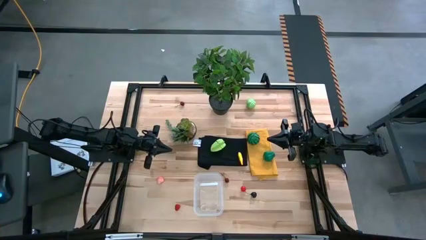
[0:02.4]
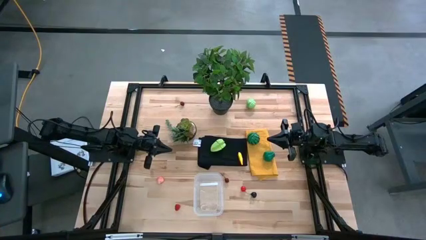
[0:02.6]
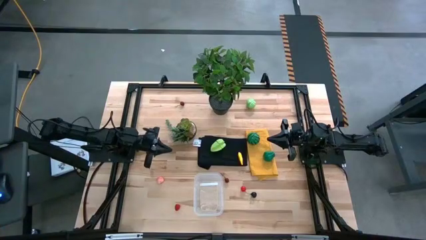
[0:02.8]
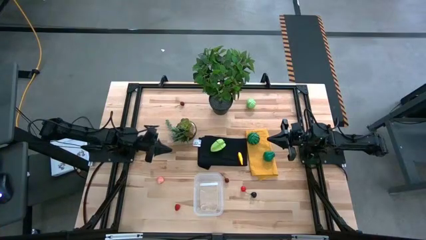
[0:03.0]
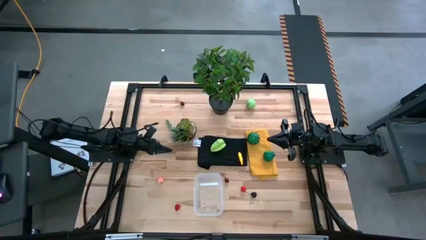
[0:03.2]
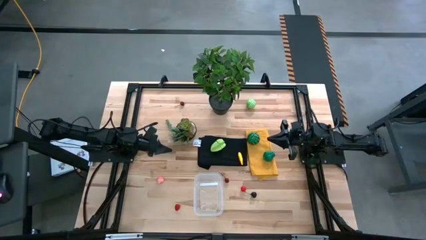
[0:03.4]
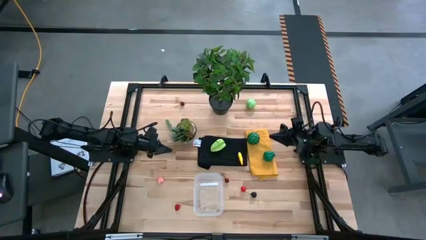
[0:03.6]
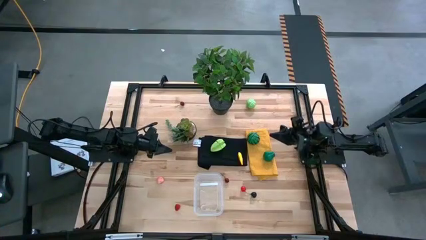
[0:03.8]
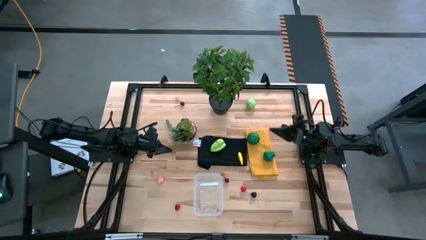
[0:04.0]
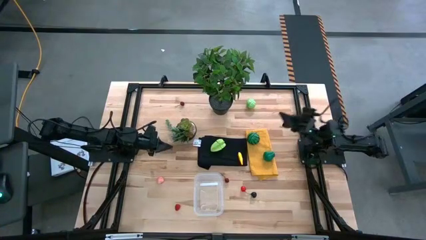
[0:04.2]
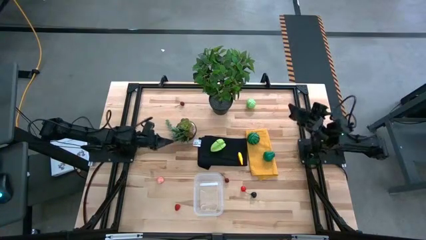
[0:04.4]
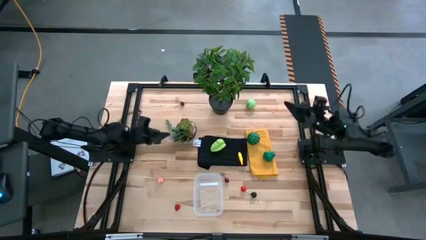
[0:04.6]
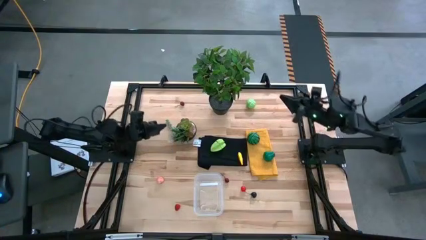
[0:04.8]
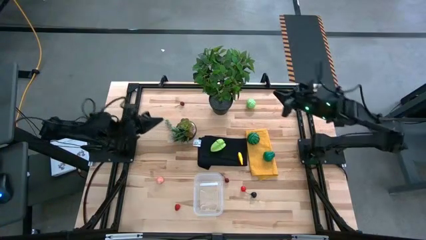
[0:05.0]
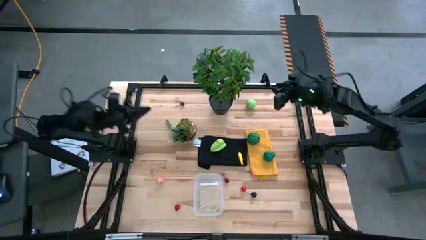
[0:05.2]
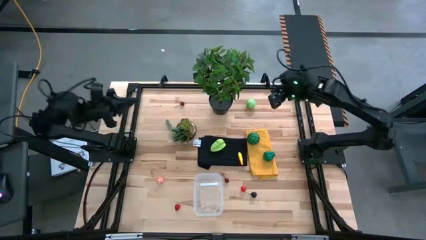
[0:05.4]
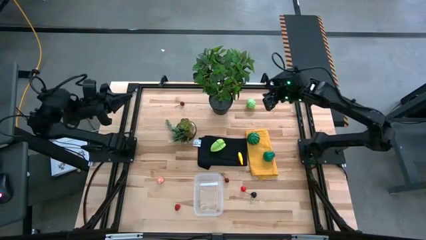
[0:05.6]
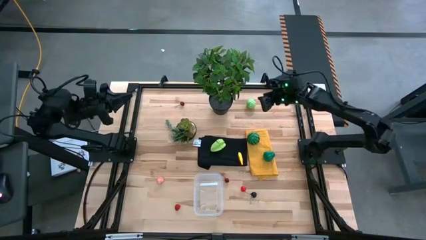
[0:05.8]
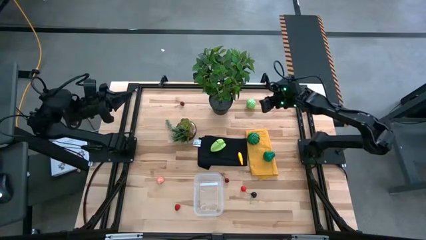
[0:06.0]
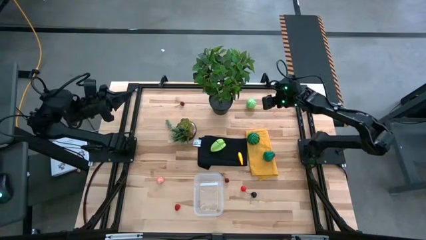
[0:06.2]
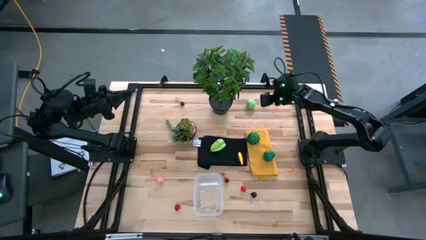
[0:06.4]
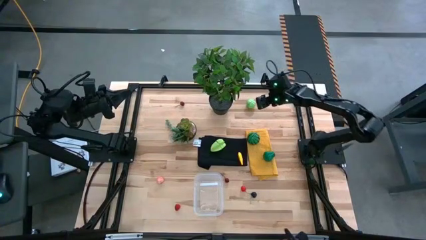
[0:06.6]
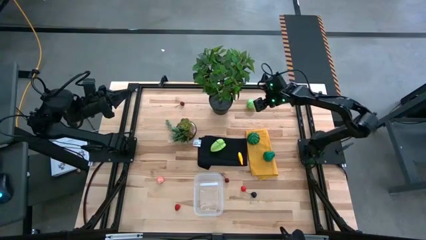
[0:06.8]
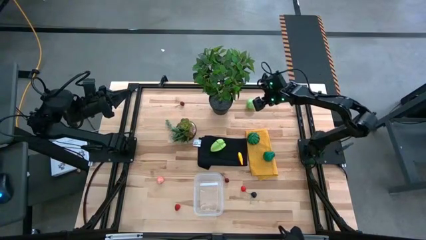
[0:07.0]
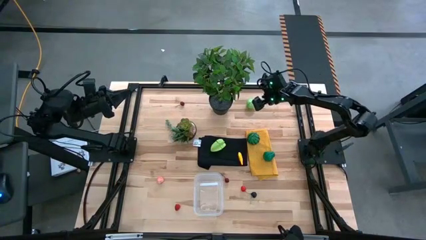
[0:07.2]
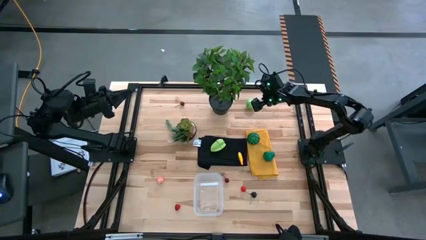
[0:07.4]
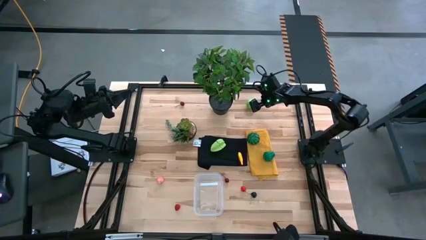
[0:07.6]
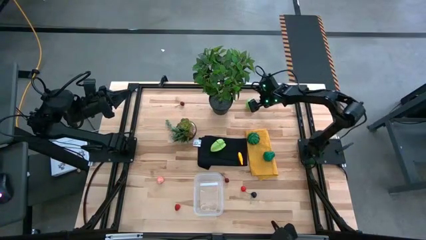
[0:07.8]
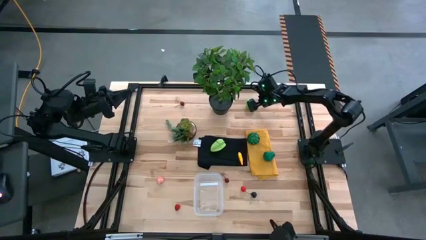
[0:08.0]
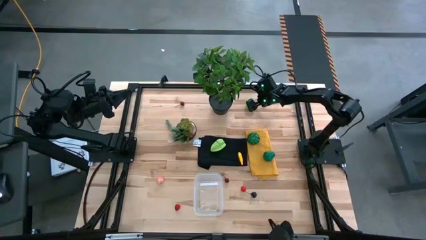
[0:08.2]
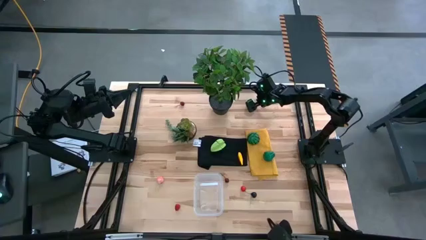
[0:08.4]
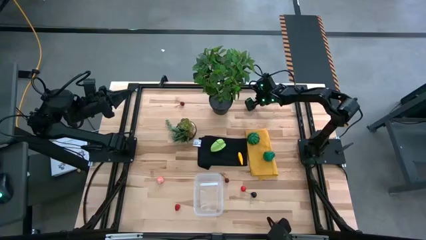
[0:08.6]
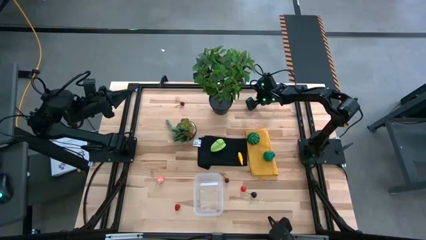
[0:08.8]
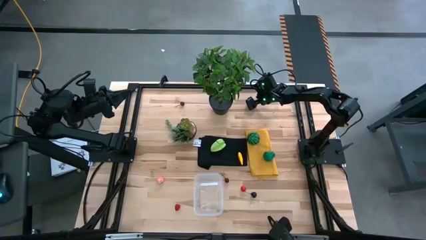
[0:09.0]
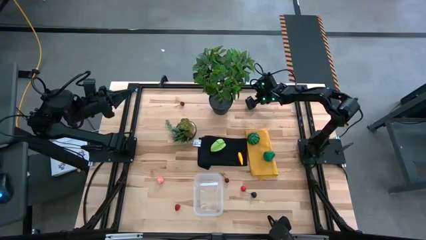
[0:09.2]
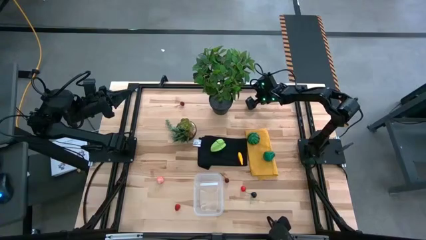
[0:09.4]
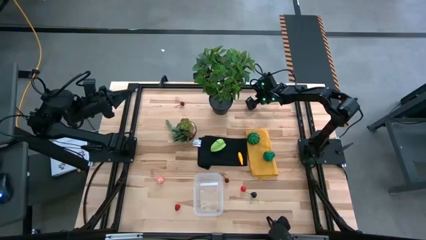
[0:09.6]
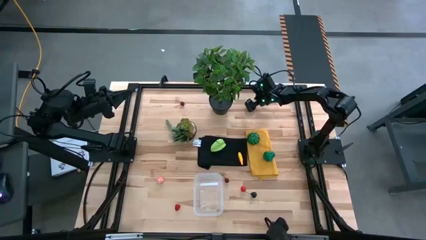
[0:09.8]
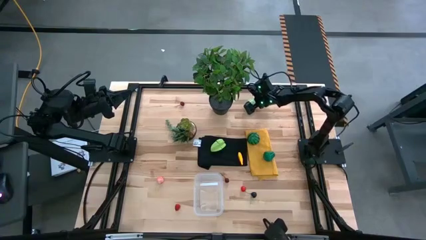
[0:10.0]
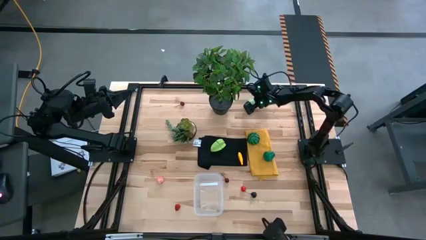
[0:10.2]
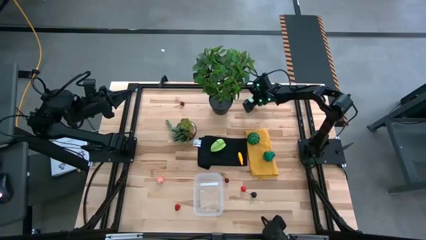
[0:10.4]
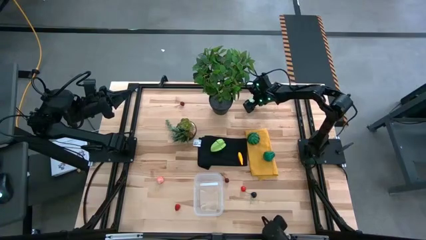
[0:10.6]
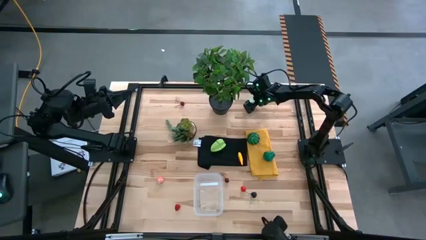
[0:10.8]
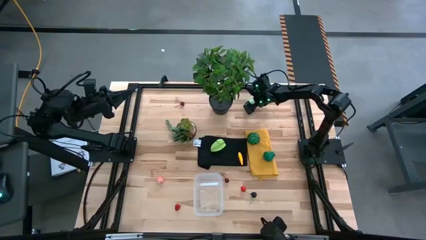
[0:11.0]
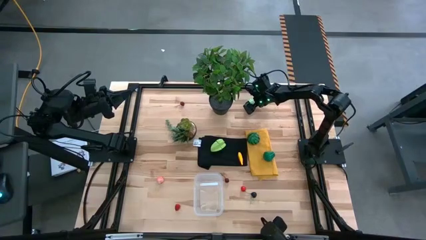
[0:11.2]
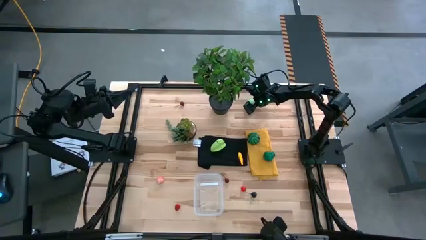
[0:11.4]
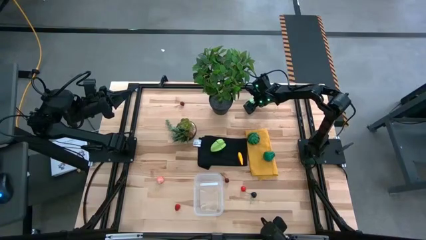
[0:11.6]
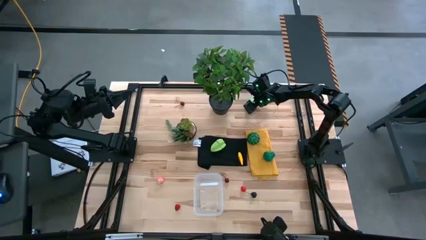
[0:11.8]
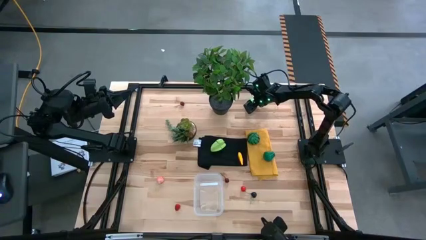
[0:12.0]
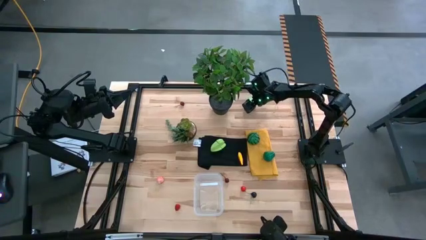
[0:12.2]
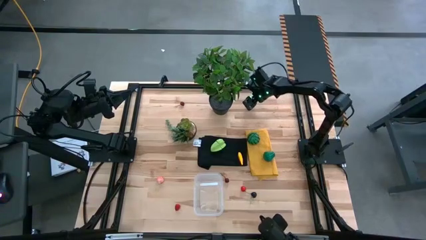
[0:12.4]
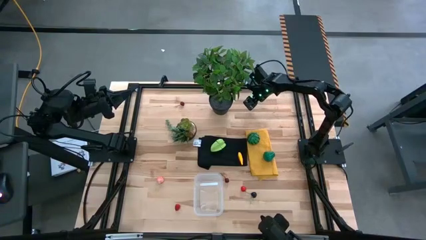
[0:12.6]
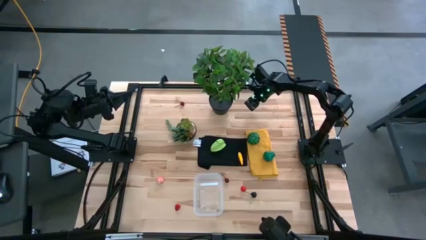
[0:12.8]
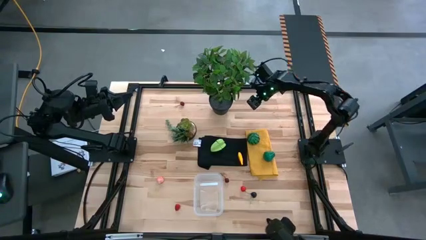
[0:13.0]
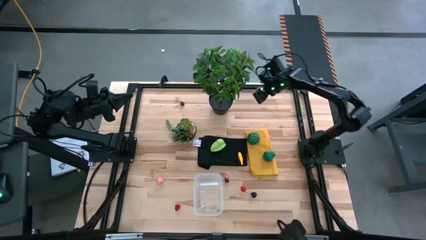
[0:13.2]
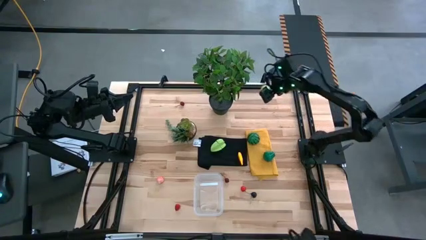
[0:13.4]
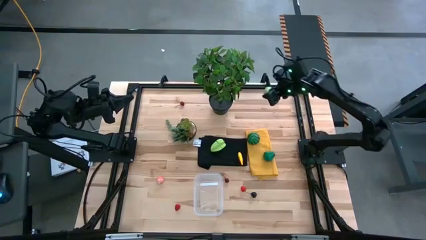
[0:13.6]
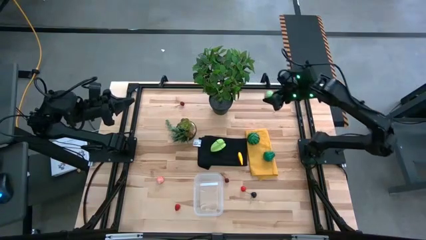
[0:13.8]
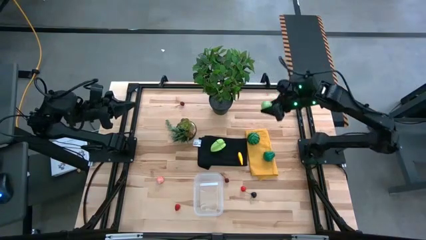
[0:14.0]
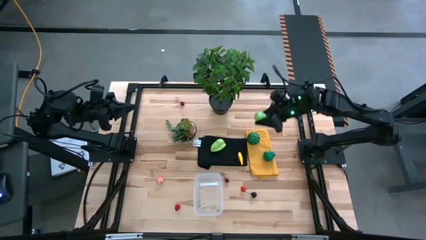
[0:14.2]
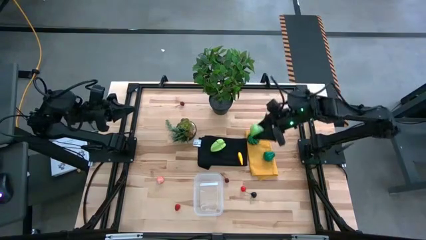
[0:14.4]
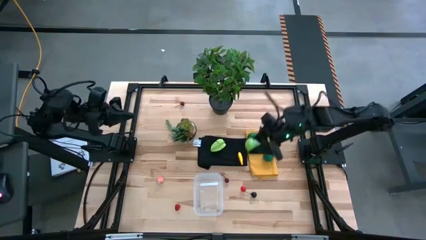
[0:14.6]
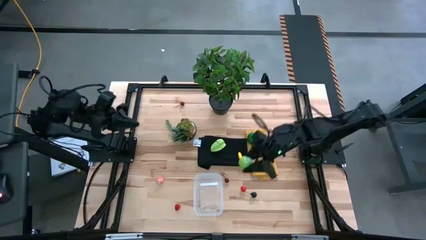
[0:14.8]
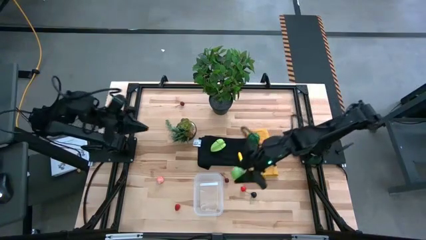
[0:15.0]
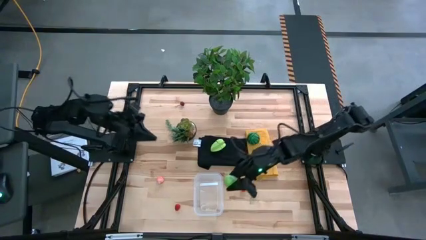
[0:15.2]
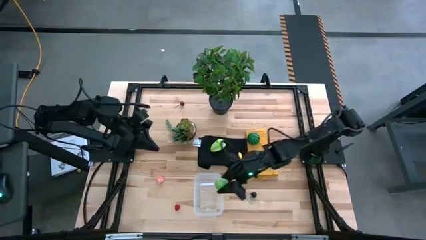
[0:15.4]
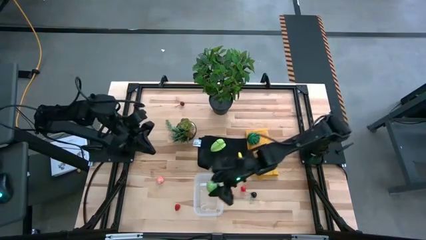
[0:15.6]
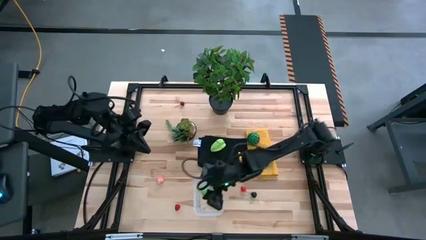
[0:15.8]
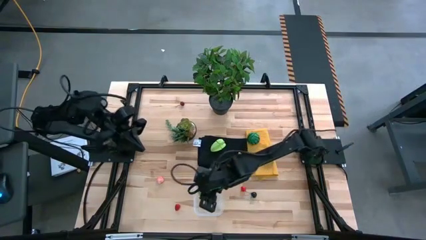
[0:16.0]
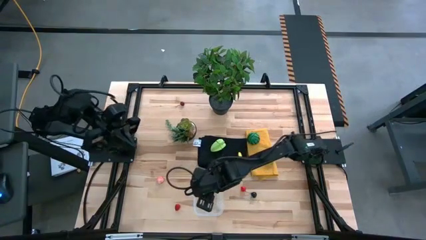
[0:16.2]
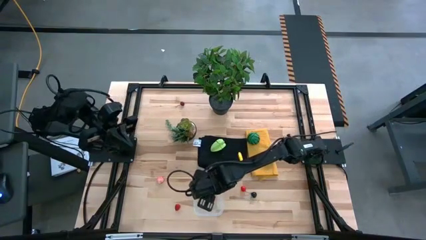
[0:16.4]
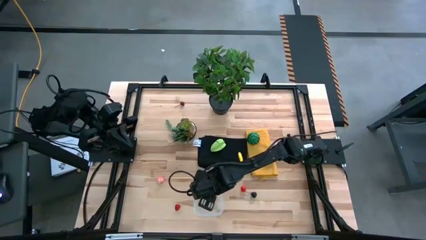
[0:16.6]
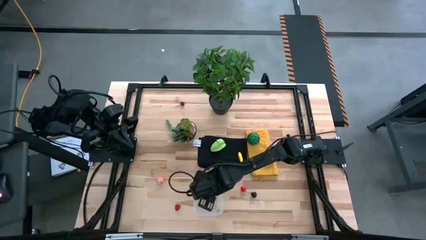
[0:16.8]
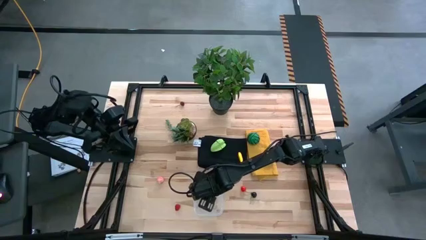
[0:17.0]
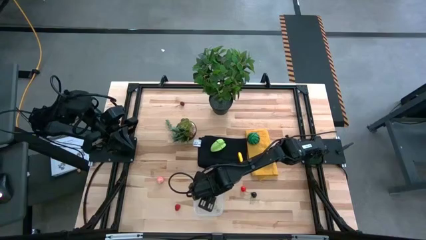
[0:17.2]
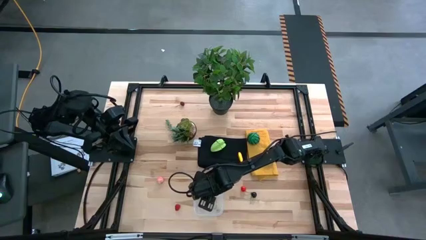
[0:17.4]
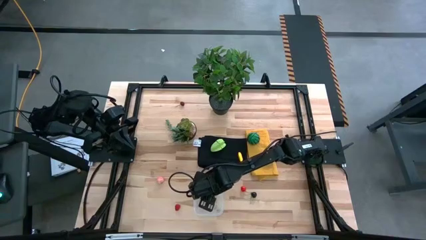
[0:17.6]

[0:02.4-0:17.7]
Task: Pick and placing Produce into tupperware
Put the cabbage into the bin
